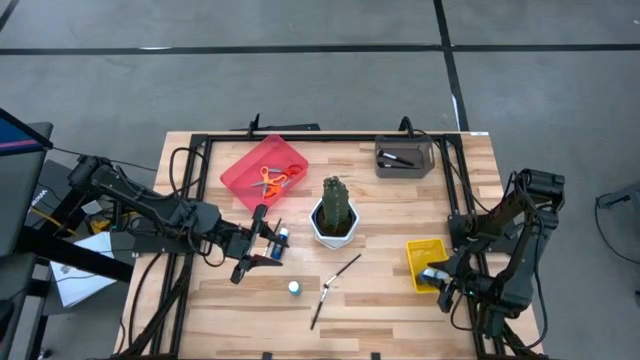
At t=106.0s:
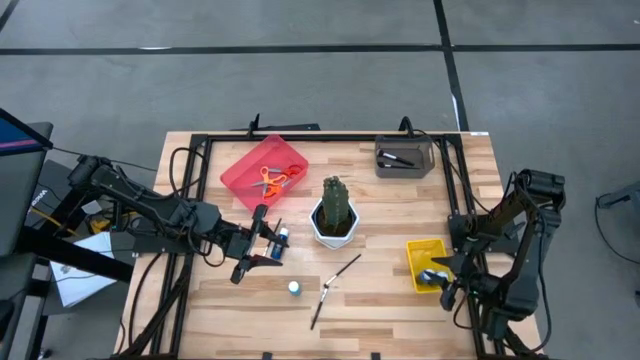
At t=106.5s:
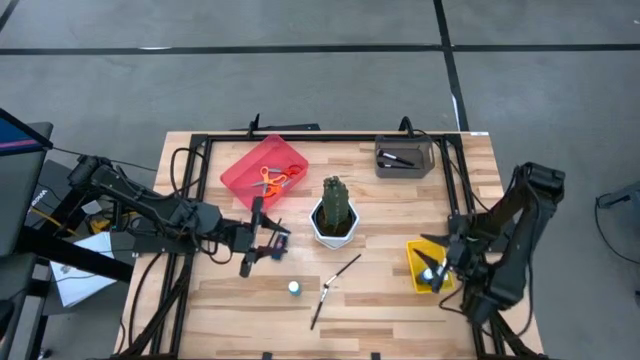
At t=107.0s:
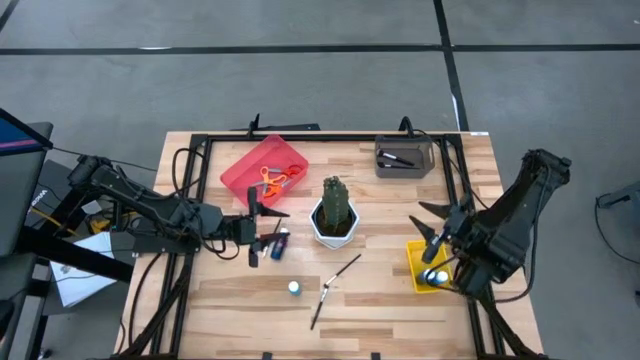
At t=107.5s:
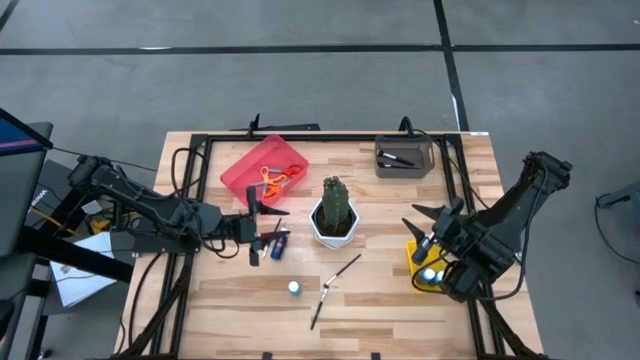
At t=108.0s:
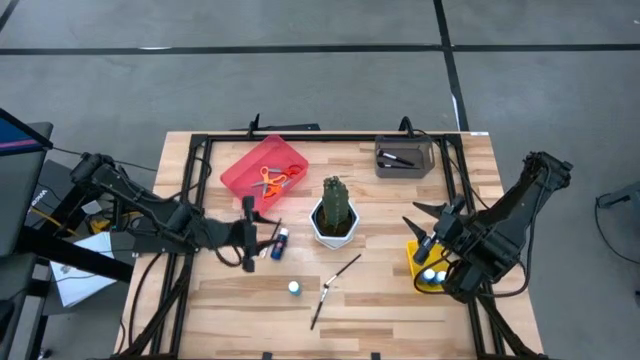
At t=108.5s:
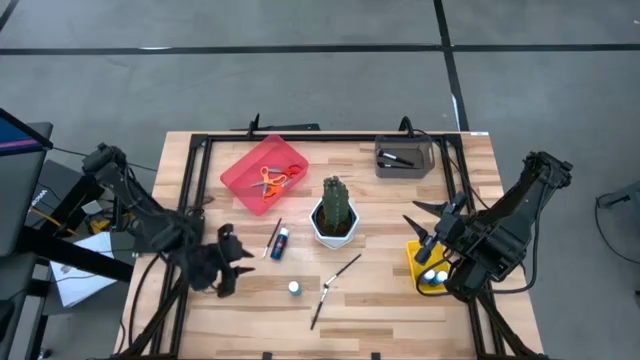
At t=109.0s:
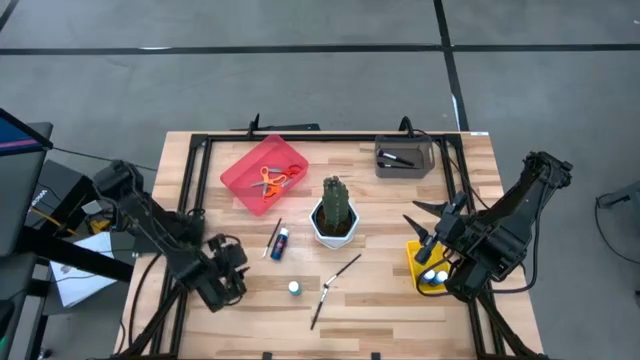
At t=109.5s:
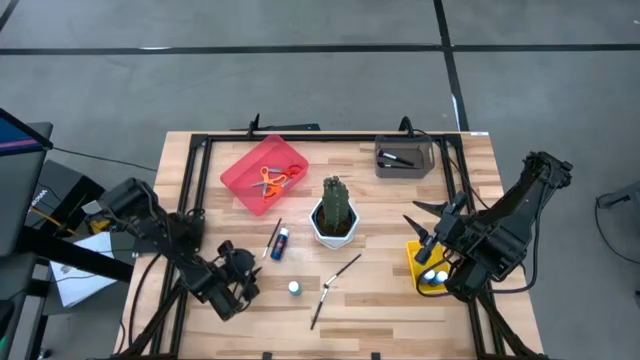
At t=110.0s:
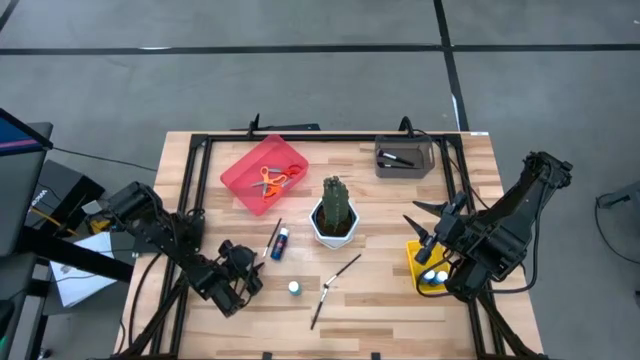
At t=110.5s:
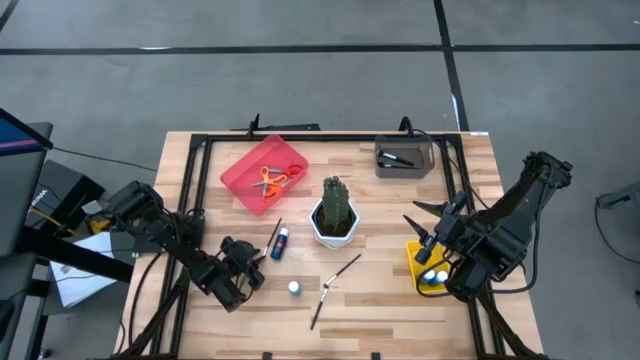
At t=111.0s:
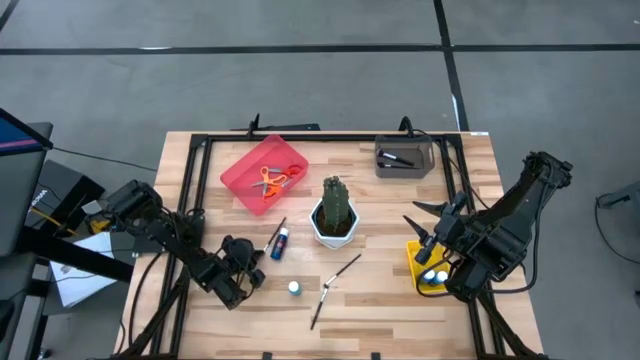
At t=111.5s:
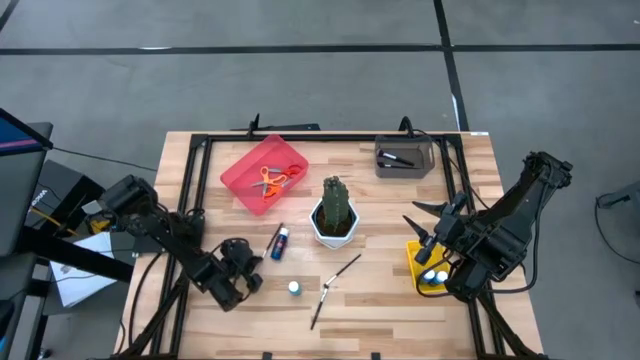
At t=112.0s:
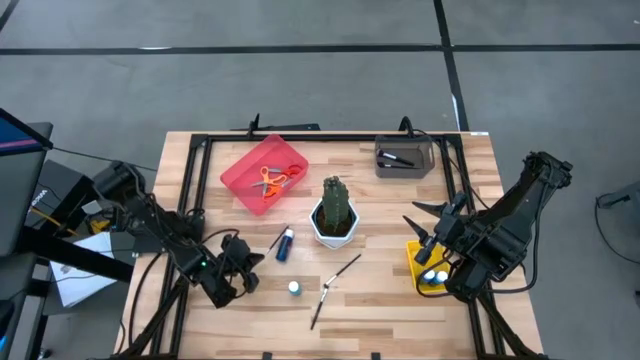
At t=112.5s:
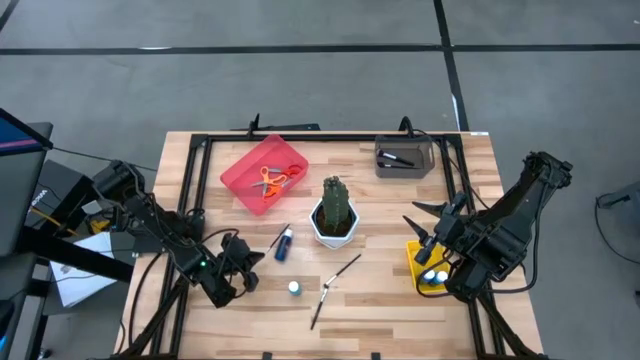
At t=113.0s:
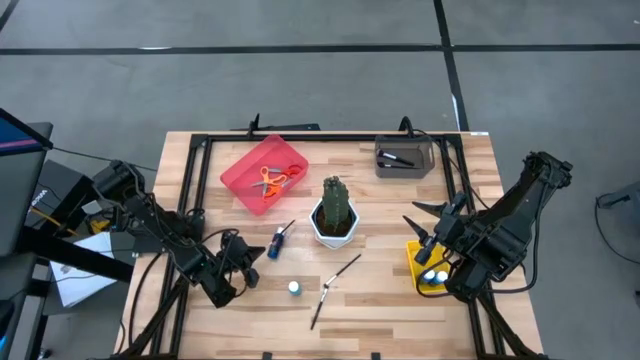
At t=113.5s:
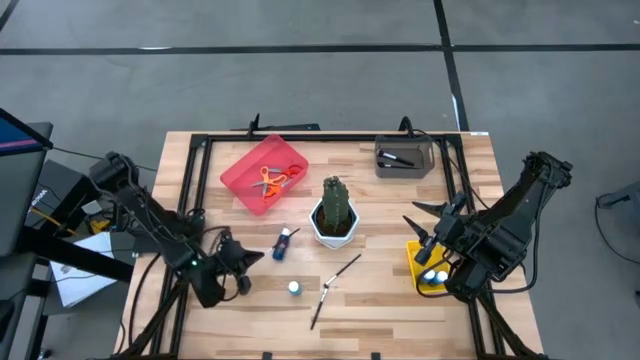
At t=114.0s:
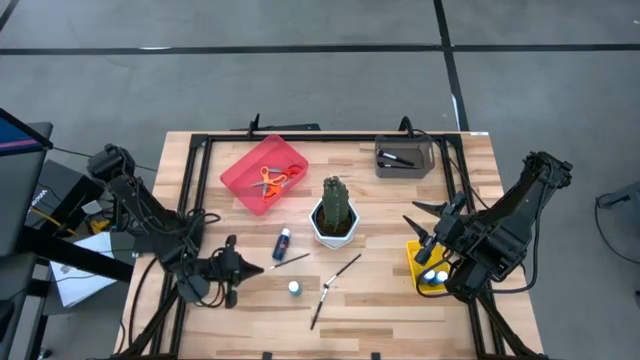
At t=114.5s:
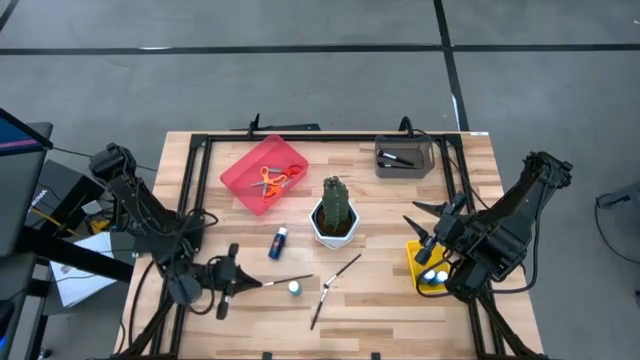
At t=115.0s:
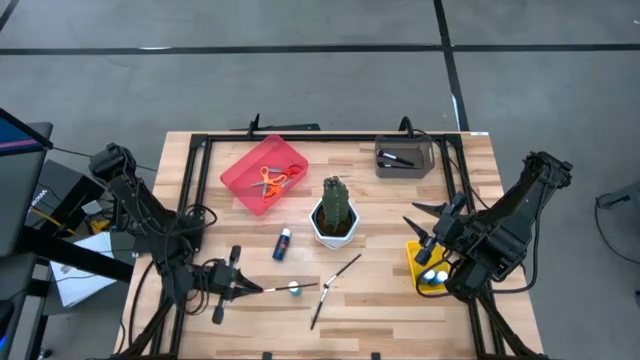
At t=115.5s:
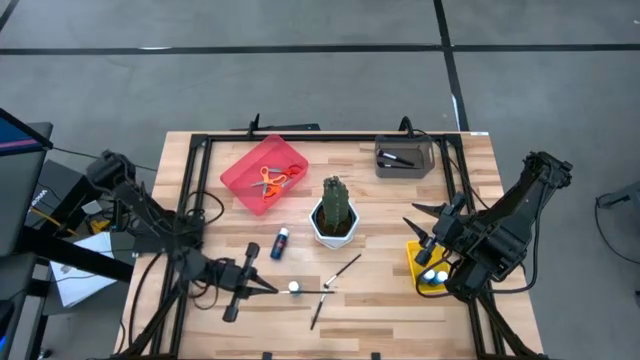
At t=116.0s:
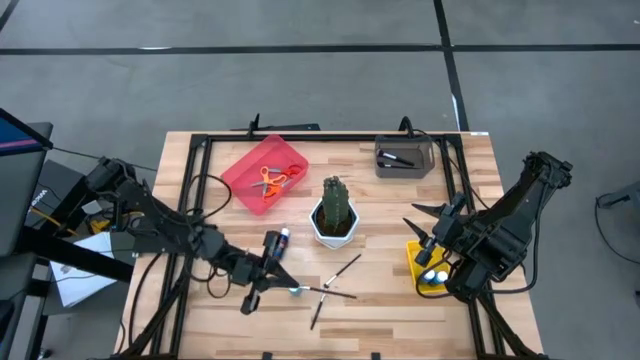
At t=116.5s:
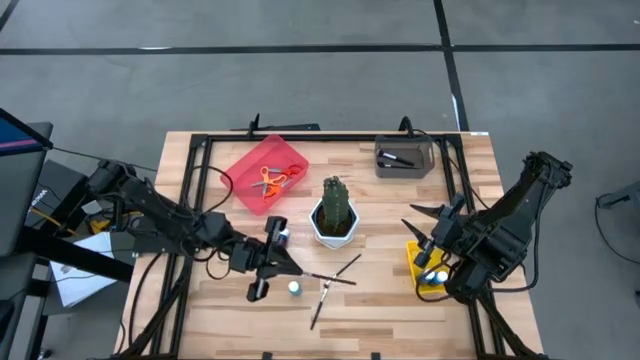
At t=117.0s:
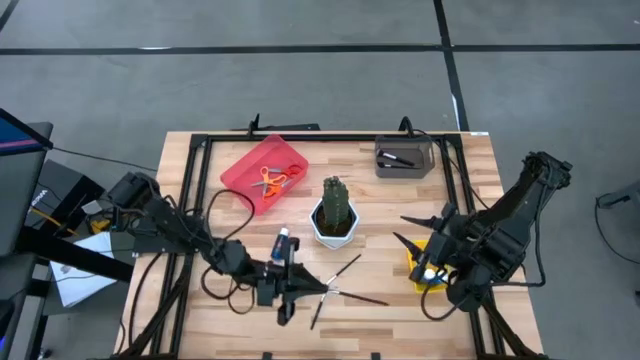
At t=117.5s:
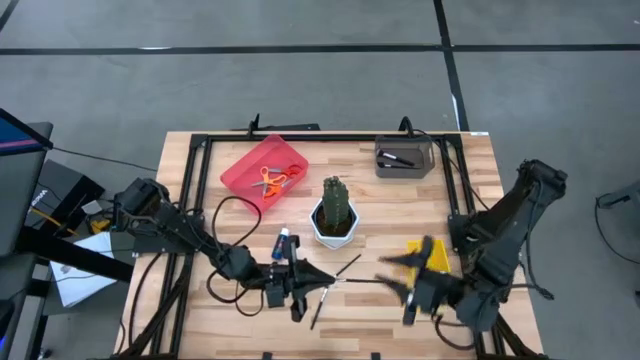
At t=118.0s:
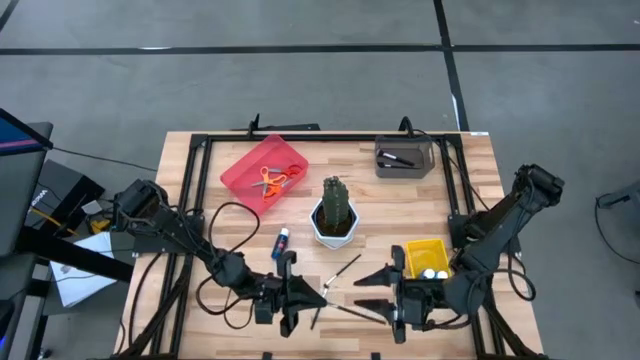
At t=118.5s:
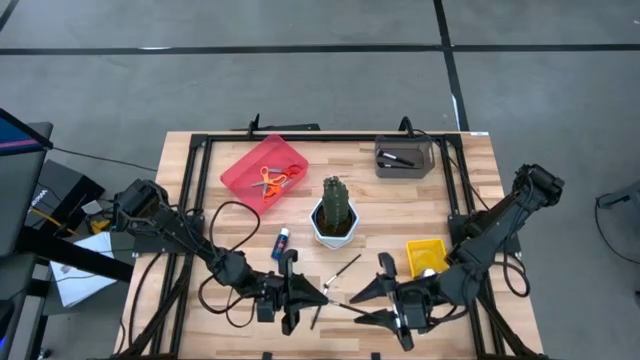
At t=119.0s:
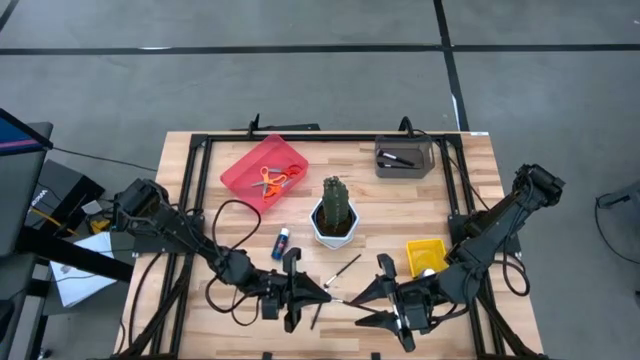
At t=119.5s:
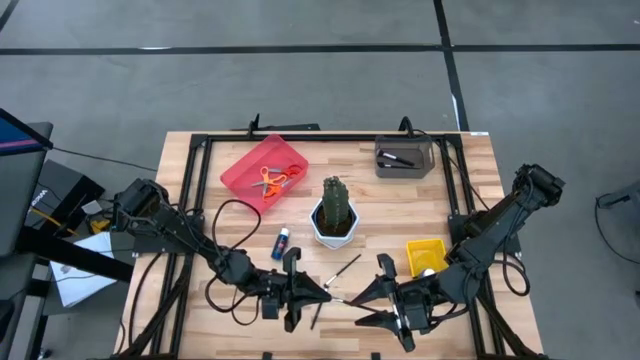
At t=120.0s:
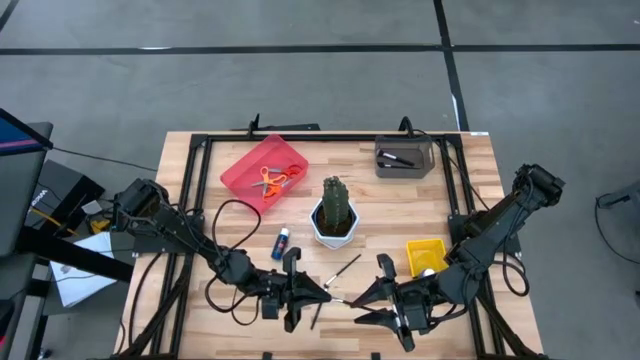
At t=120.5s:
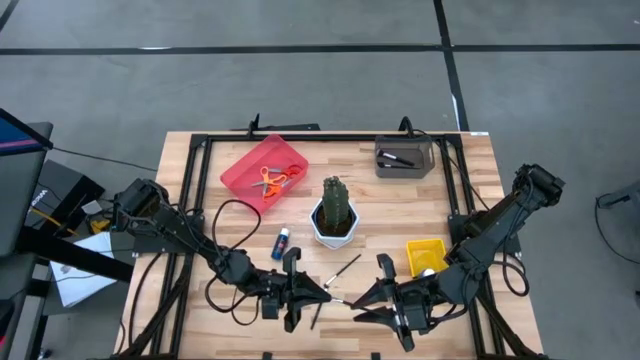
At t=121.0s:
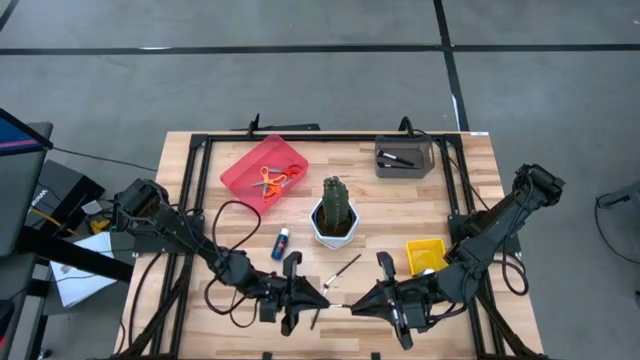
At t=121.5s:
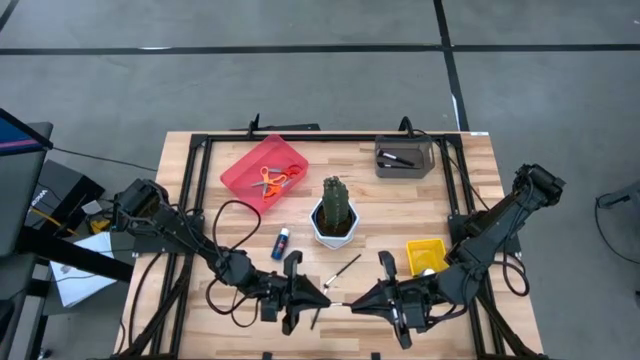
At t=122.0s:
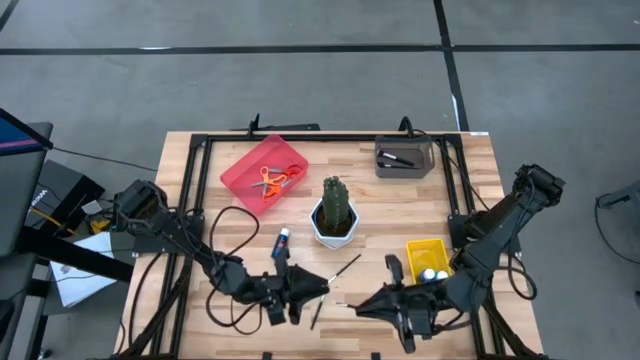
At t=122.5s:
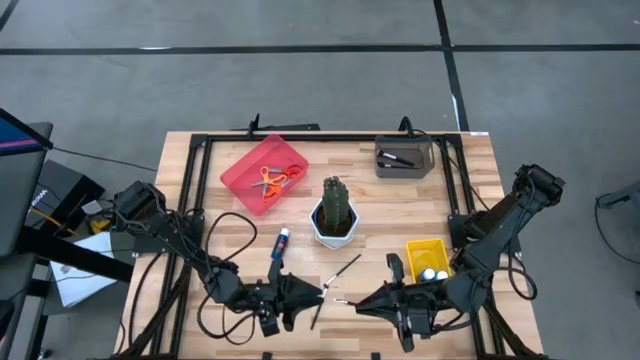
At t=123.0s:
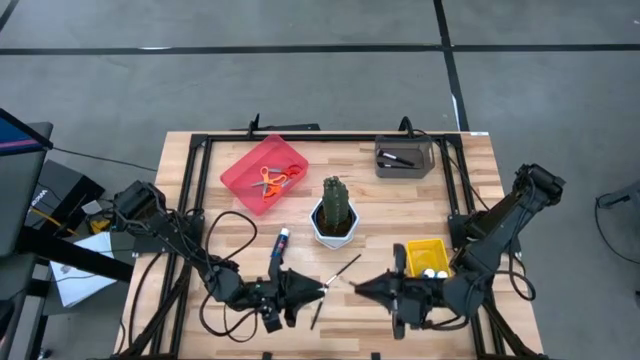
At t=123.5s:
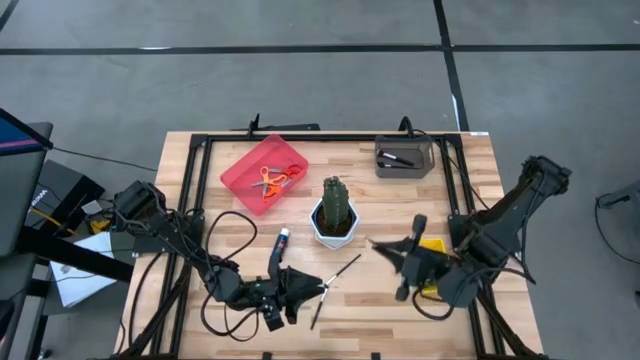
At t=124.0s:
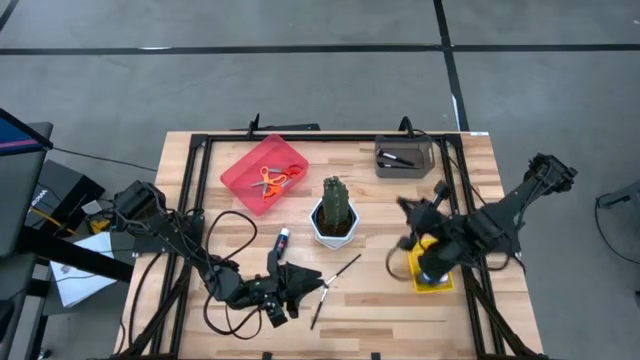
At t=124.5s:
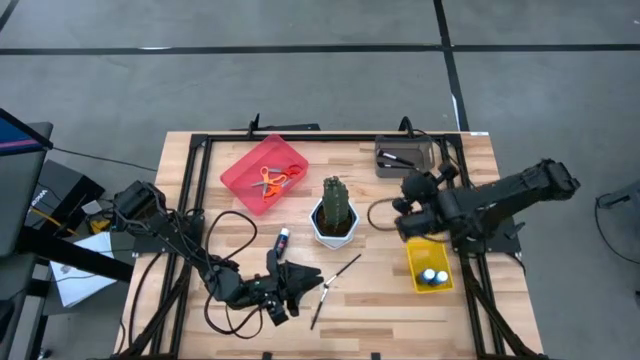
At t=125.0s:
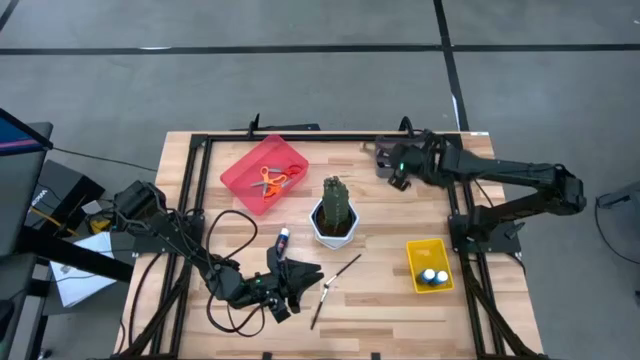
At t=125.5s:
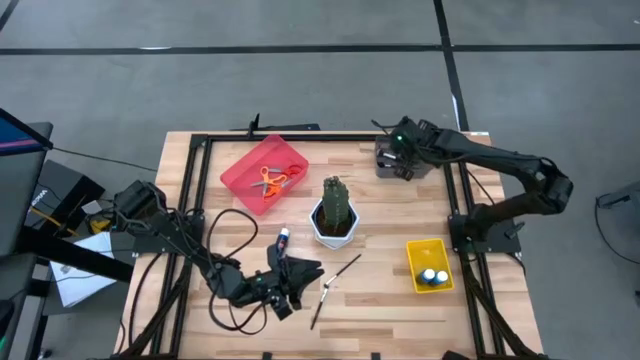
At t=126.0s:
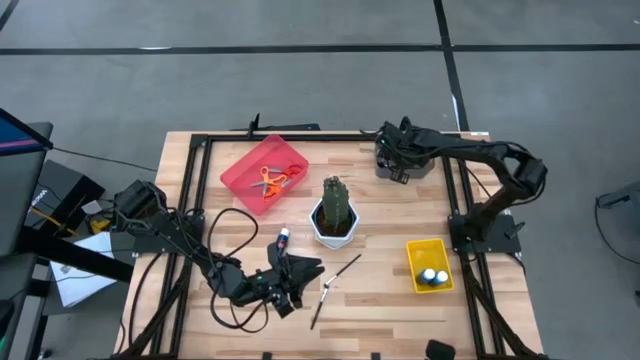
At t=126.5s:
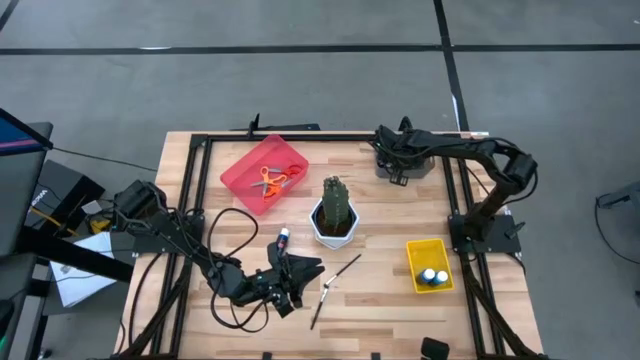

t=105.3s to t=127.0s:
Task: Pick & Place Paint Supplies
Put the eyeshadow brush into the black bin
